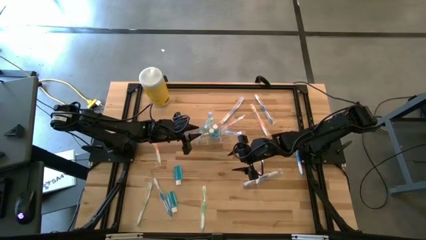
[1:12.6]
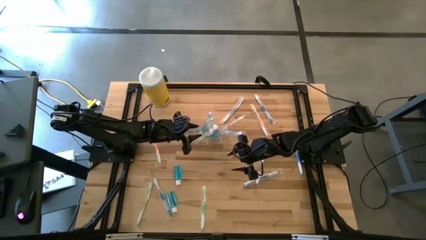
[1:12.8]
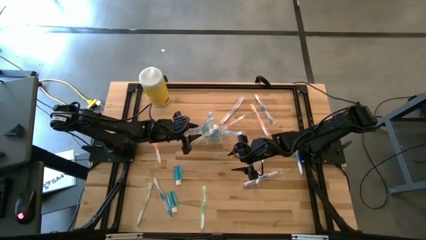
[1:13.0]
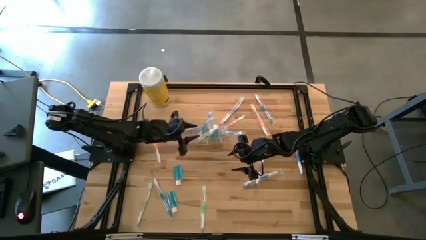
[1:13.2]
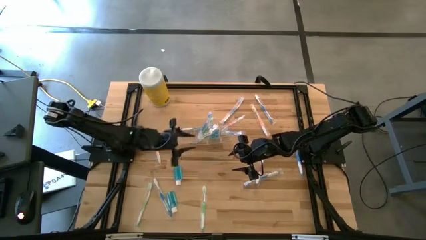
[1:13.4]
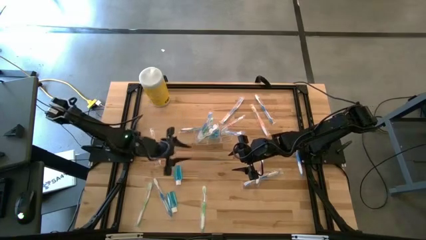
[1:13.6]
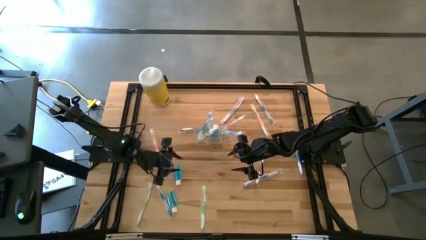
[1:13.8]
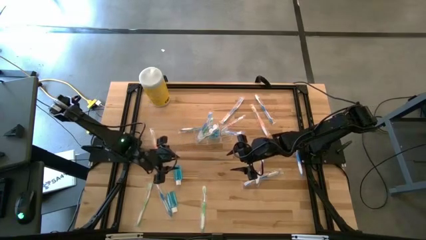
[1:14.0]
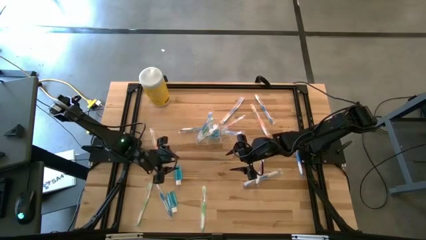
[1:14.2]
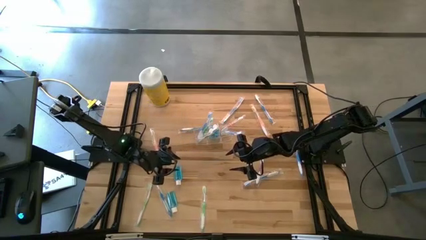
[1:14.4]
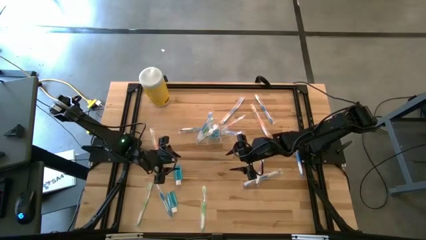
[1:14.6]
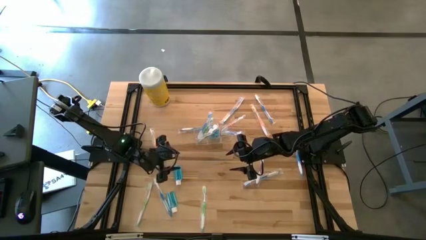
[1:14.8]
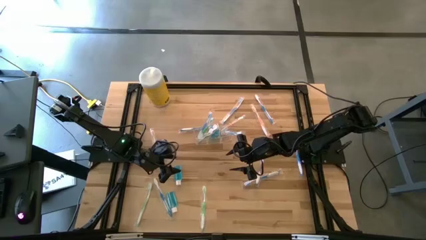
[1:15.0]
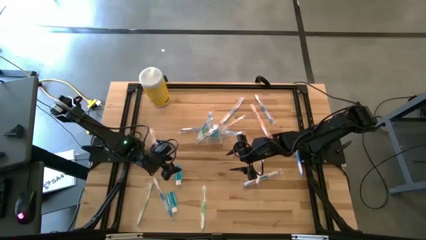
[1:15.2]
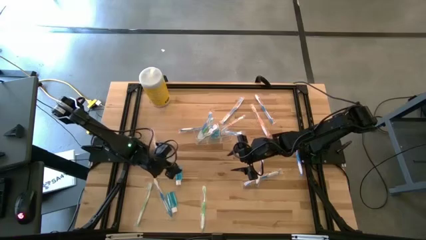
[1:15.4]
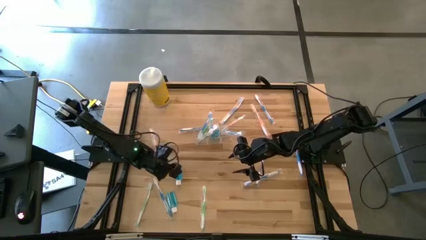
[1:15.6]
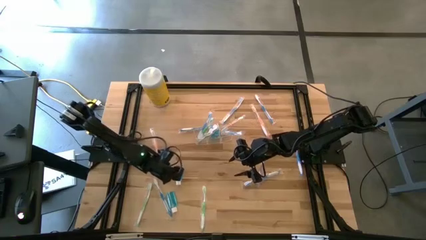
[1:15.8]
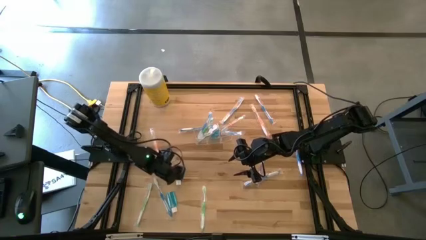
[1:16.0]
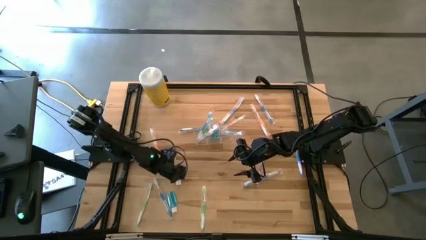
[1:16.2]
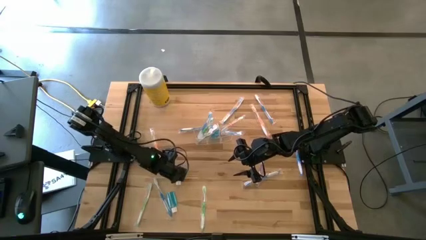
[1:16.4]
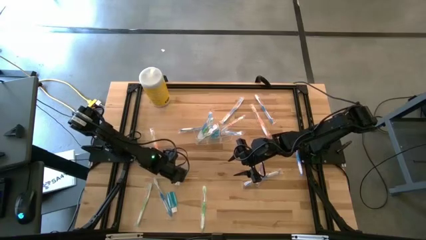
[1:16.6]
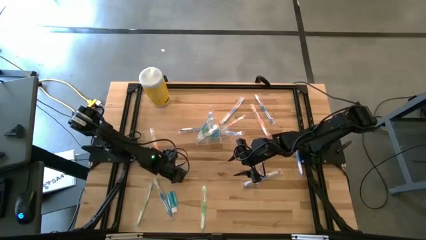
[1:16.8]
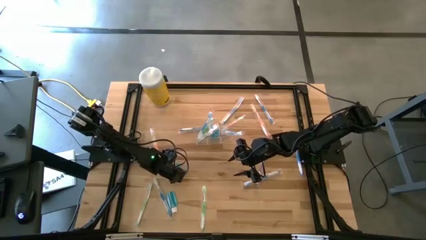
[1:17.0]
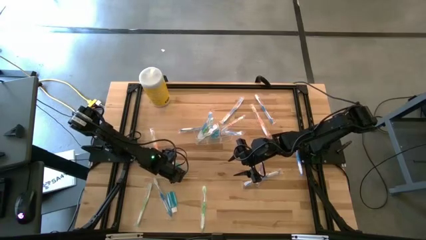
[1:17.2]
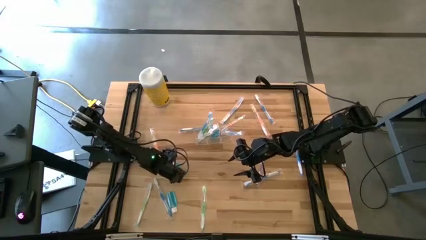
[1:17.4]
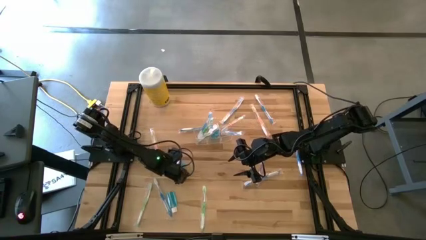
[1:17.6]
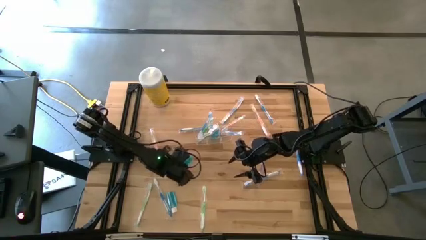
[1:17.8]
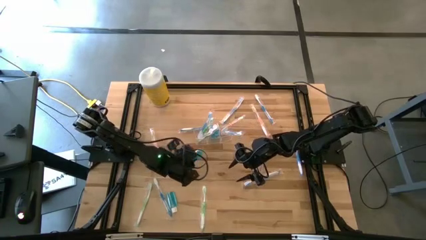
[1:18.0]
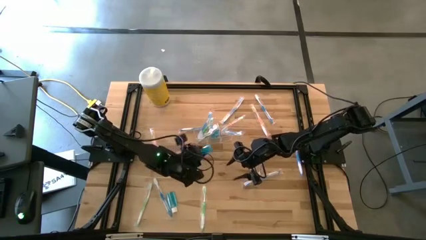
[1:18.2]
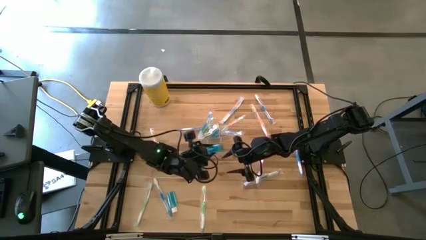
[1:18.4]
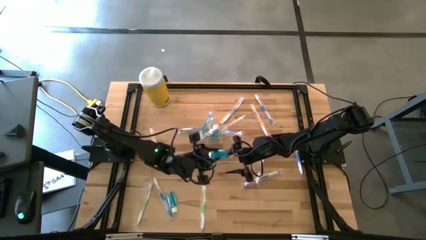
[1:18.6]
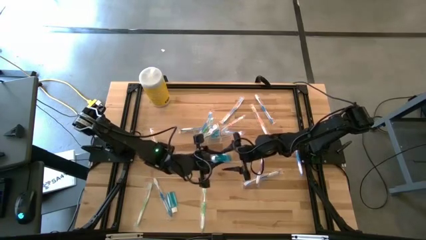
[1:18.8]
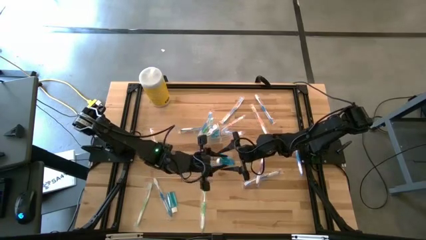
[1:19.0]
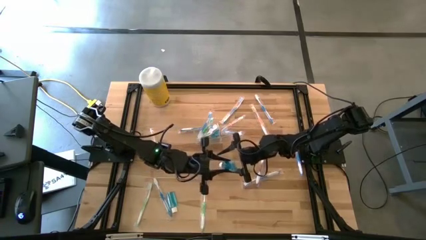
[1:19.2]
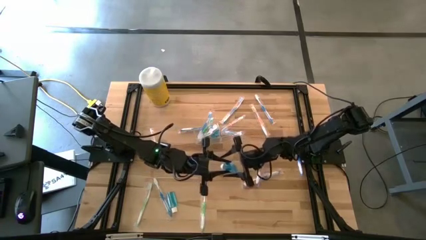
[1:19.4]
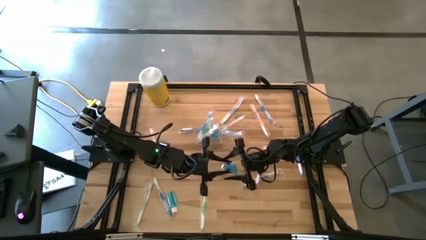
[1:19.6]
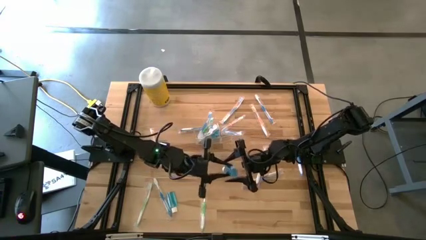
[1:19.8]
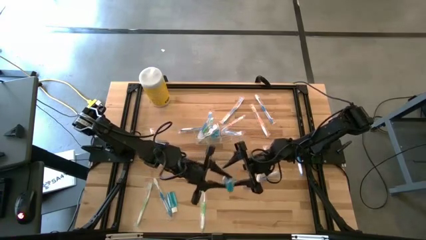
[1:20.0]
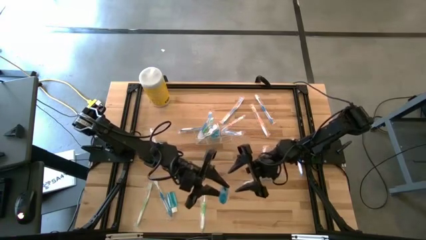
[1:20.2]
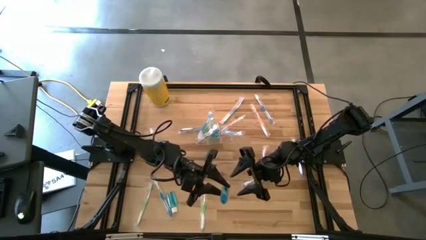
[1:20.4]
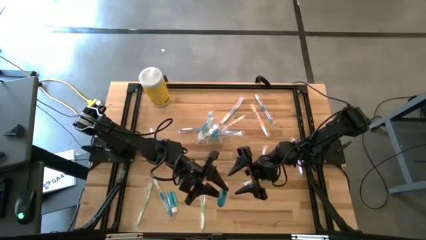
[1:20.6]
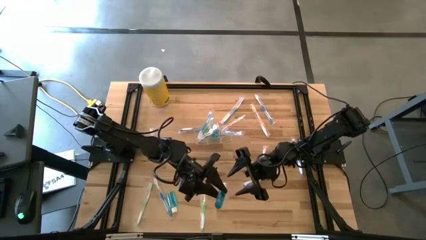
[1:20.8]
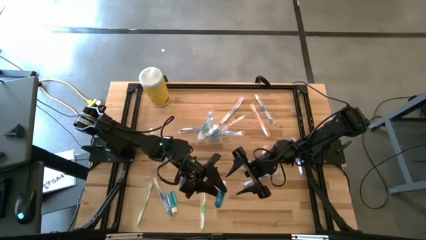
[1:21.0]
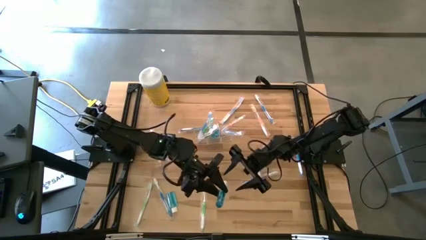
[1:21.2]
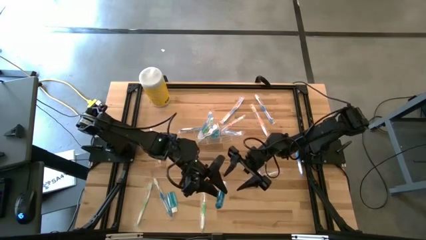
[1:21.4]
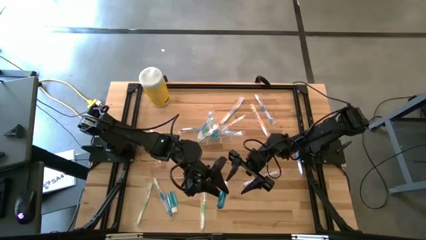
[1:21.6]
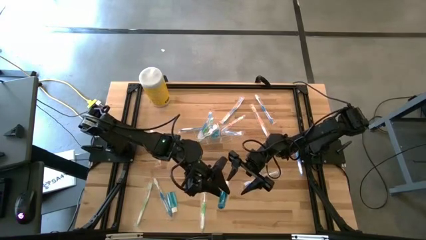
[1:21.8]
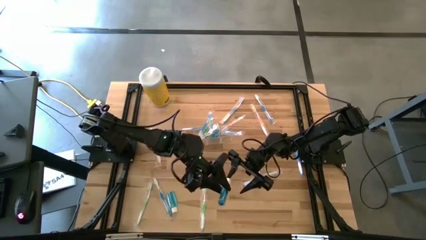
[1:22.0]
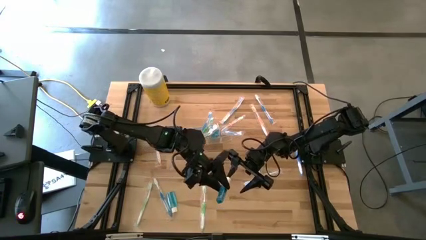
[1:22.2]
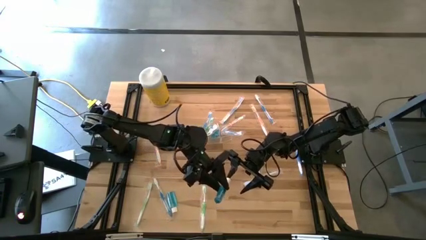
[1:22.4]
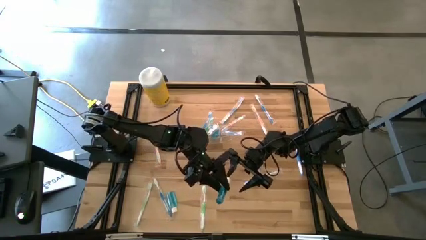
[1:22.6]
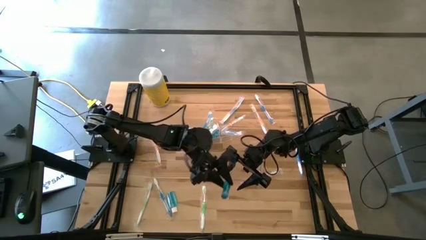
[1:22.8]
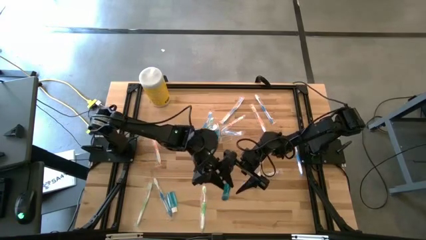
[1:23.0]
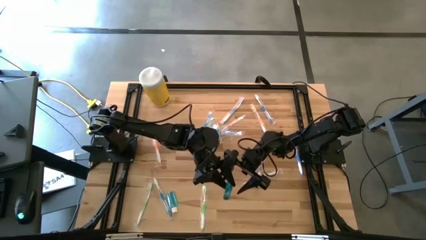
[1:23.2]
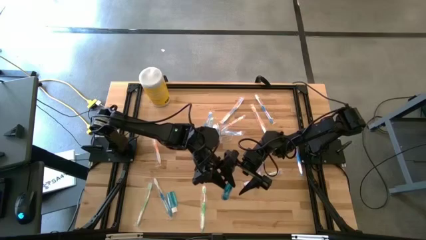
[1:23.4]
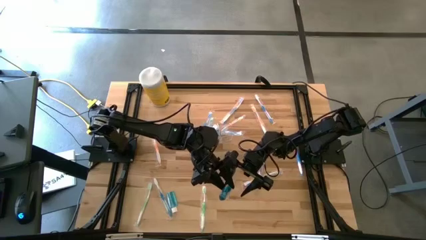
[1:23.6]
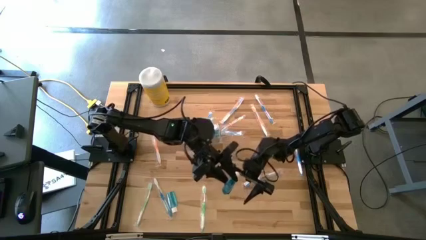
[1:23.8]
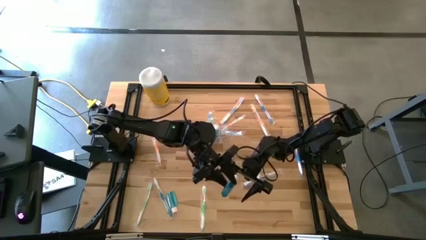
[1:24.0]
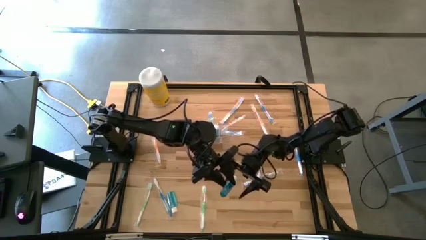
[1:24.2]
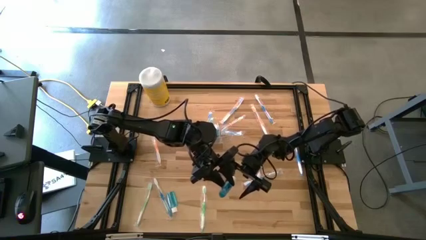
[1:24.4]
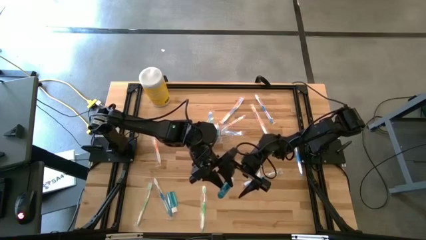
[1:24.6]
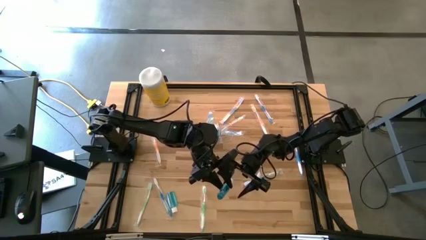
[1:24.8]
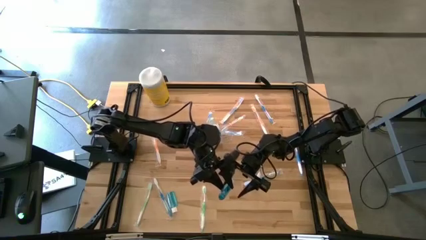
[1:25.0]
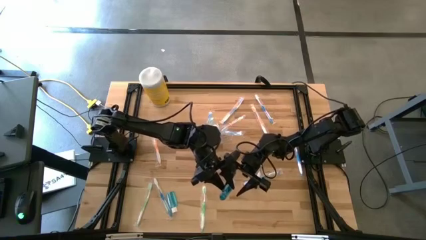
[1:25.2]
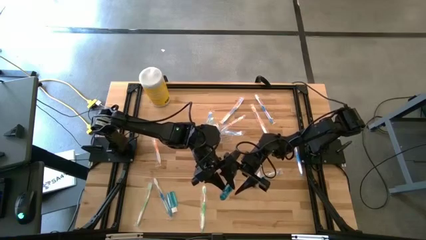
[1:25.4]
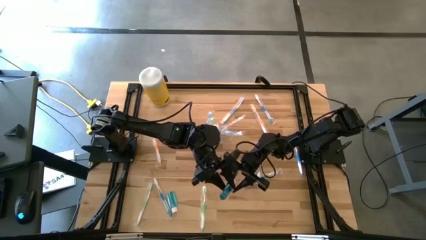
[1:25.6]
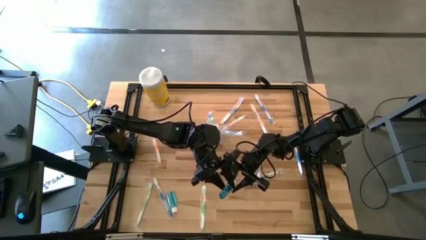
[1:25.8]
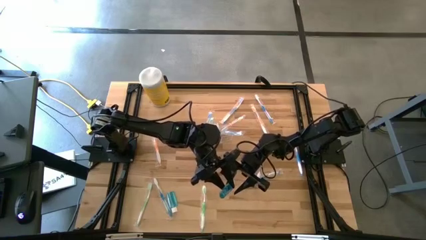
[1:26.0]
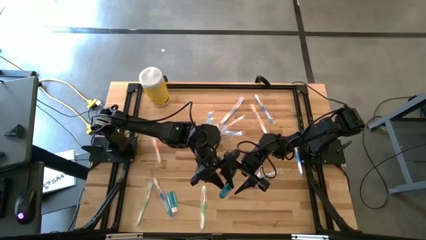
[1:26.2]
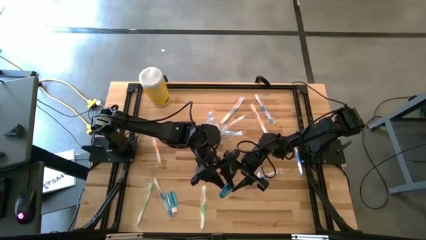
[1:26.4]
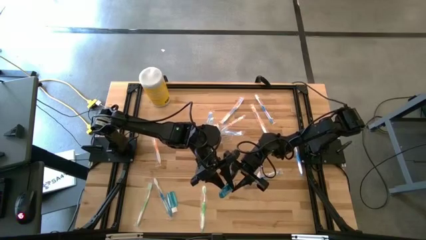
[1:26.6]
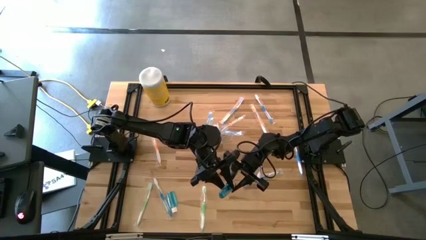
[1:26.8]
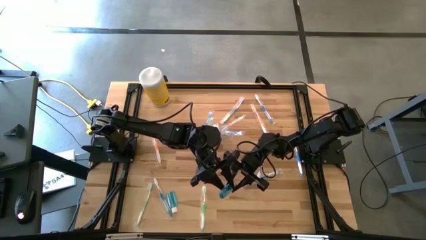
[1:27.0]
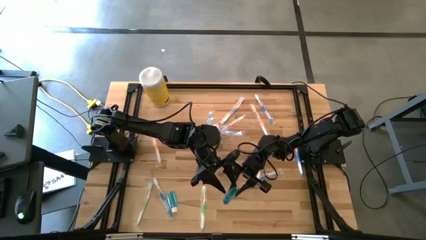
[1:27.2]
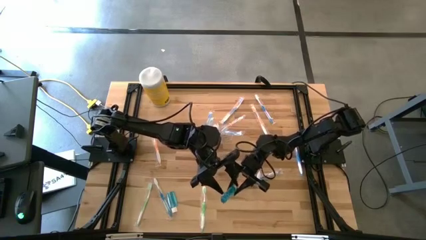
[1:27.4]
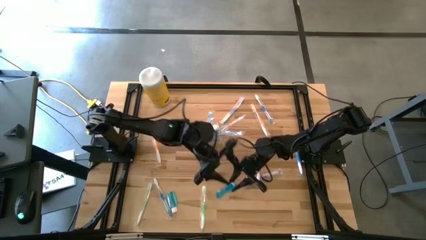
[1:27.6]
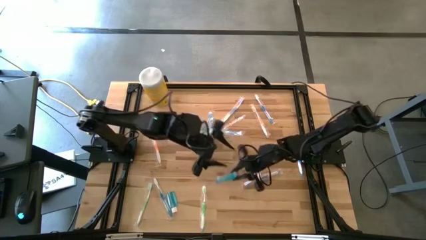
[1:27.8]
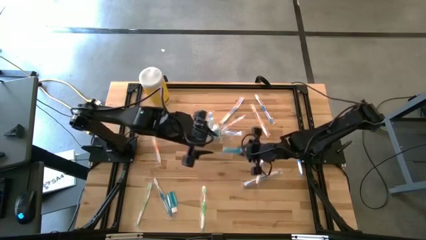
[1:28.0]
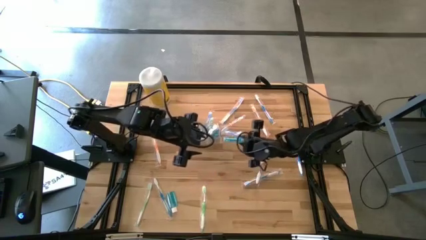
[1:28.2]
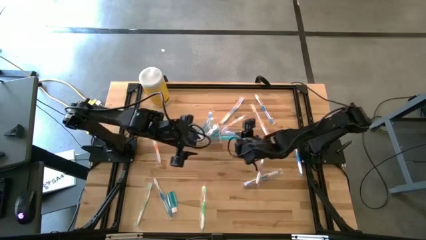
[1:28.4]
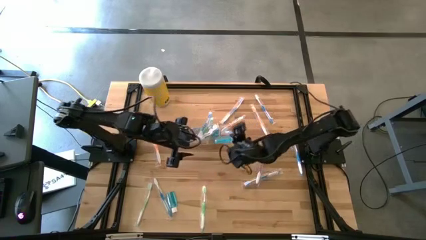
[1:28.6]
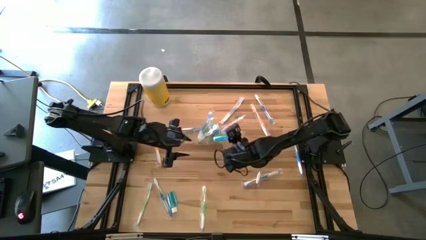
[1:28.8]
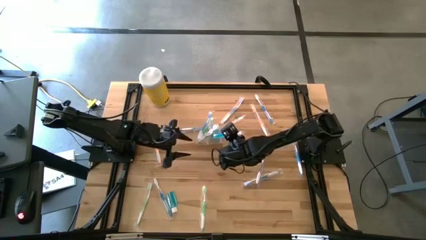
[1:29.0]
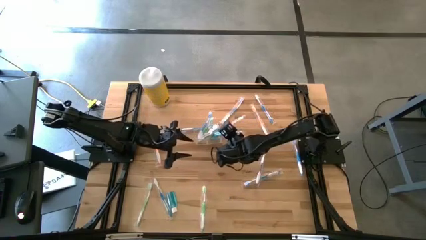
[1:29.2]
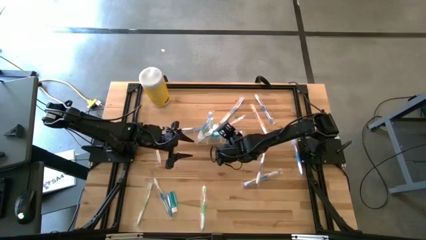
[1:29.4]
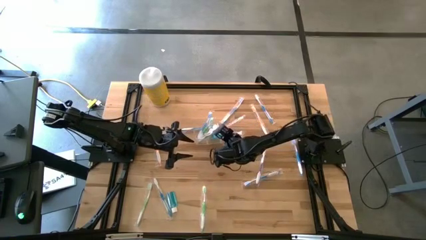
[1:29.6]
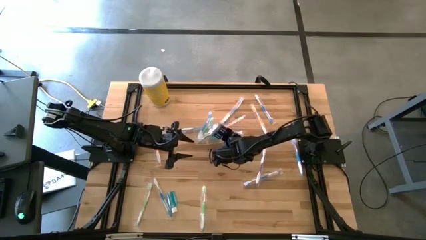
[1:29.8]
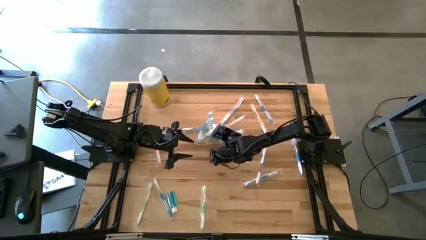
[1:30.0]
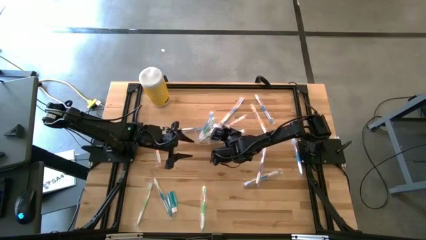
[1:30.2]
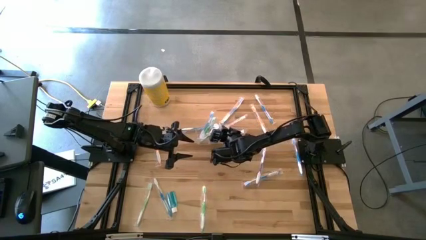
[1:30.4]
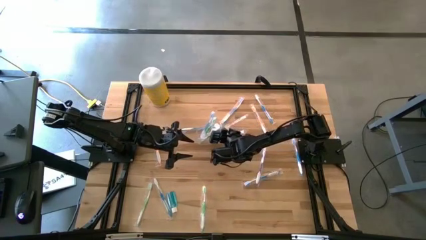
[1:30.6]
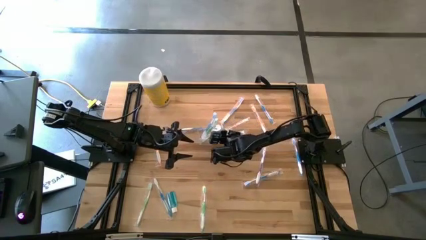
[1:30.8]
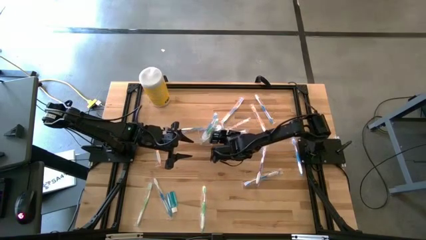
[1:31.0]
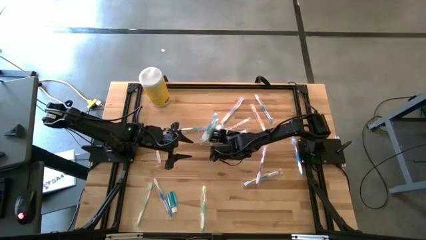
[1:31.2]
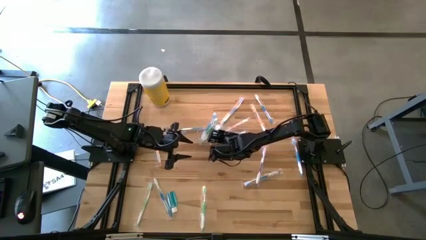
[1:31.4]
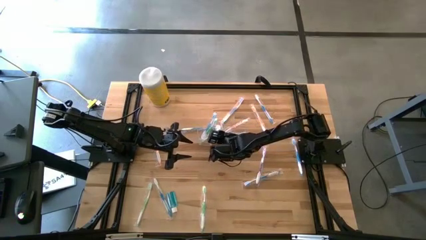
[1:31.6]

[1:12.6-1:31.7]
Task: Pick & Place toothbrushing station
Put the blue mouthwash into the transparent organizer
